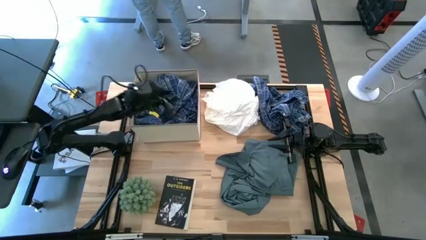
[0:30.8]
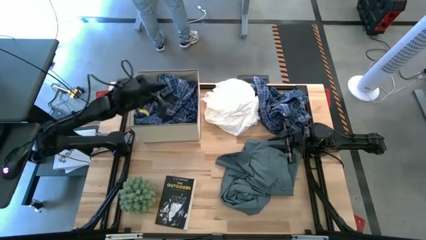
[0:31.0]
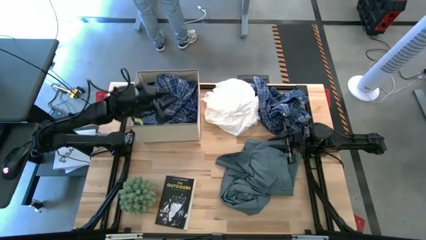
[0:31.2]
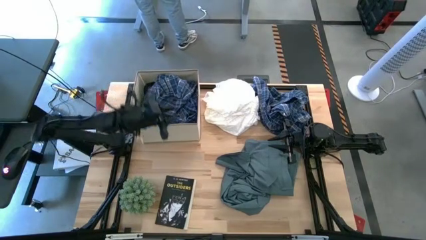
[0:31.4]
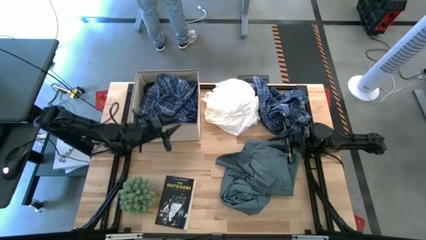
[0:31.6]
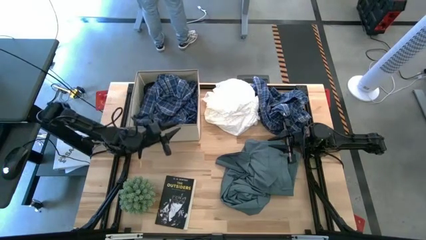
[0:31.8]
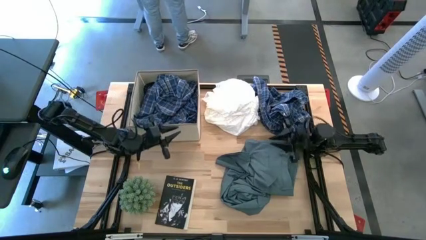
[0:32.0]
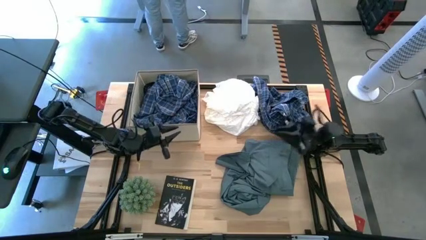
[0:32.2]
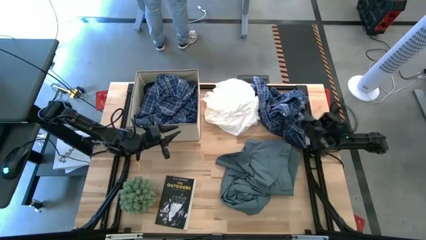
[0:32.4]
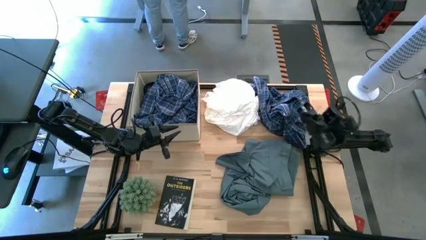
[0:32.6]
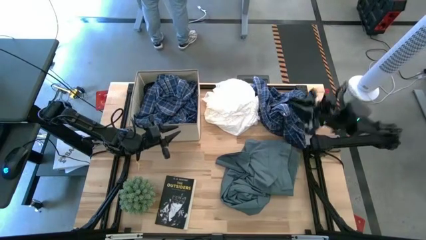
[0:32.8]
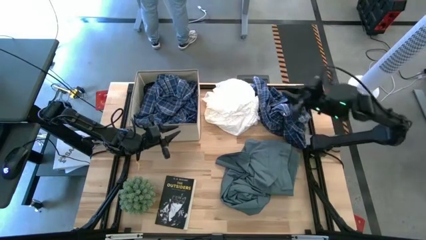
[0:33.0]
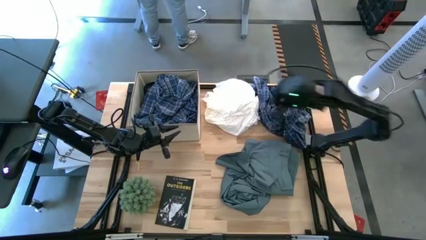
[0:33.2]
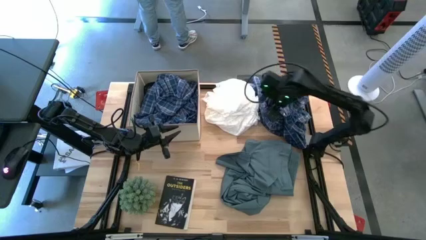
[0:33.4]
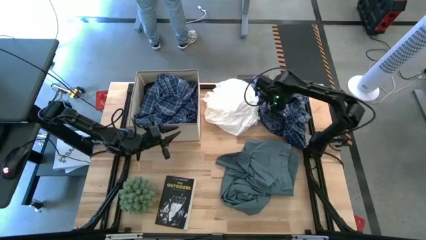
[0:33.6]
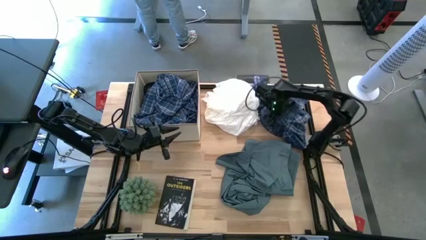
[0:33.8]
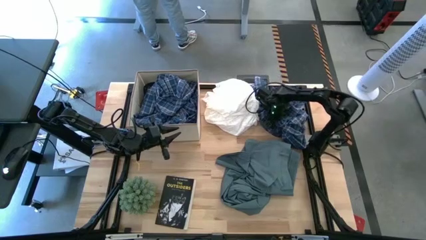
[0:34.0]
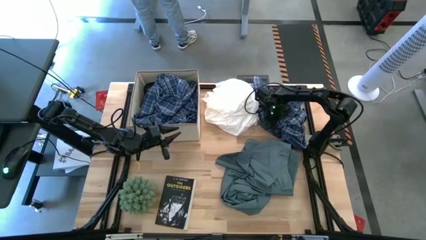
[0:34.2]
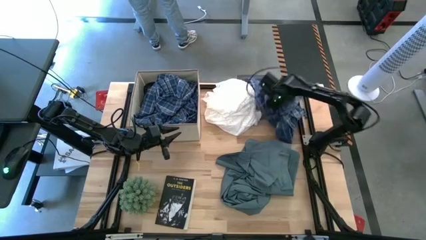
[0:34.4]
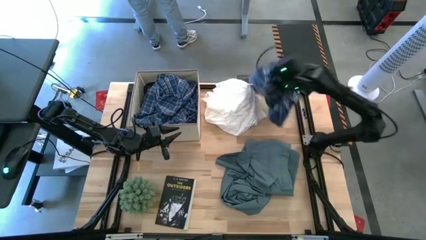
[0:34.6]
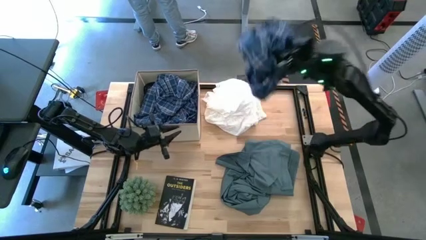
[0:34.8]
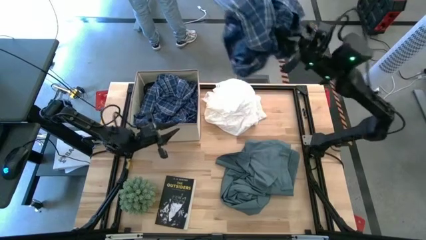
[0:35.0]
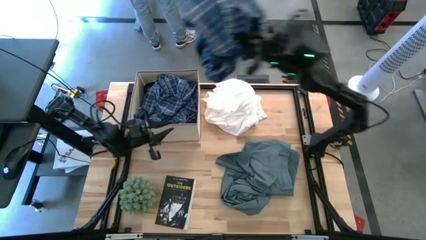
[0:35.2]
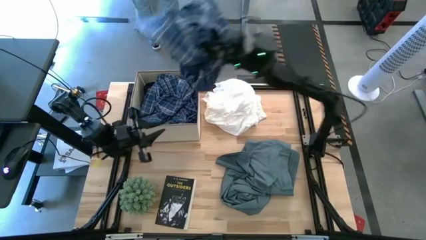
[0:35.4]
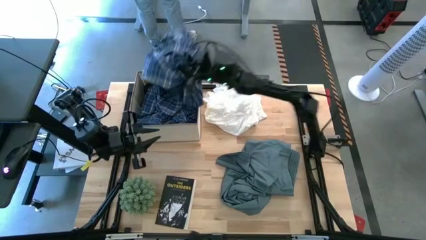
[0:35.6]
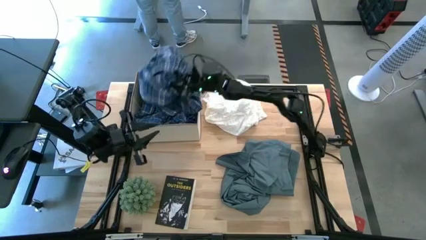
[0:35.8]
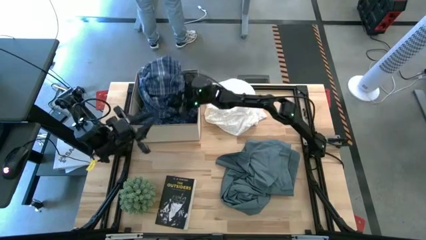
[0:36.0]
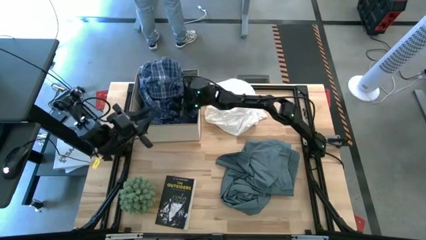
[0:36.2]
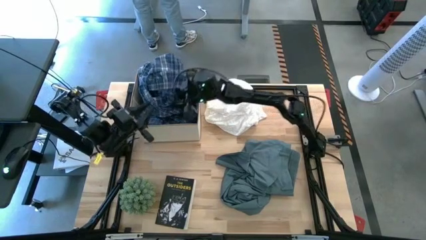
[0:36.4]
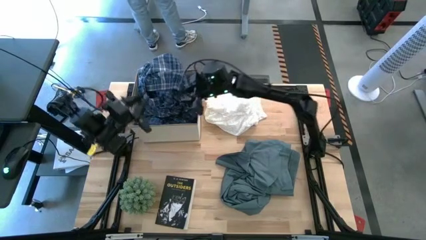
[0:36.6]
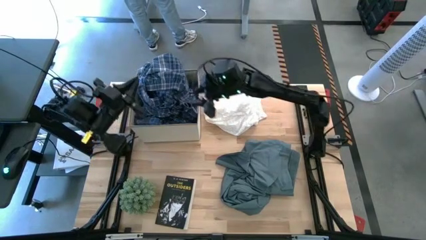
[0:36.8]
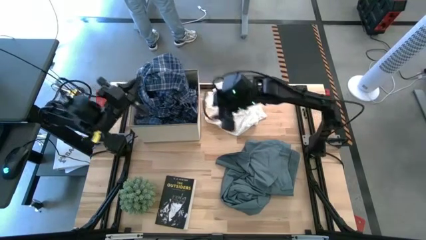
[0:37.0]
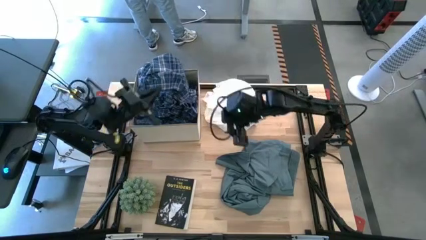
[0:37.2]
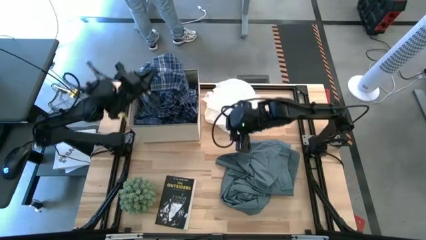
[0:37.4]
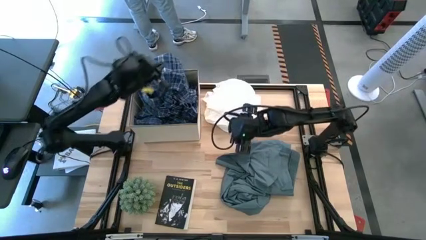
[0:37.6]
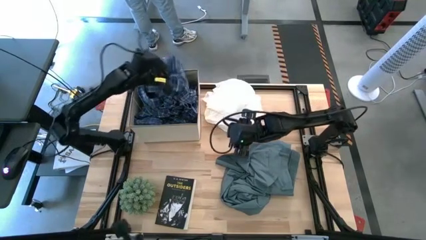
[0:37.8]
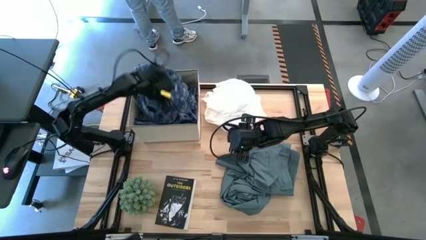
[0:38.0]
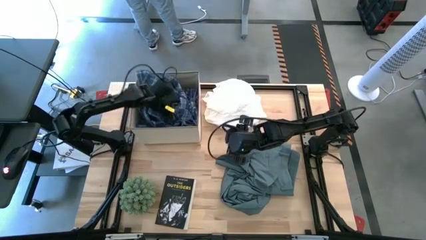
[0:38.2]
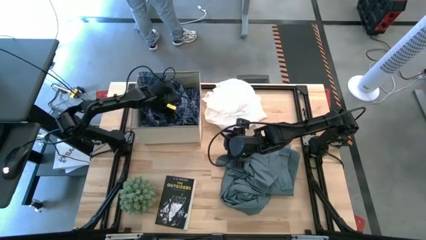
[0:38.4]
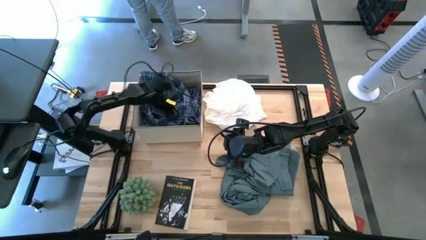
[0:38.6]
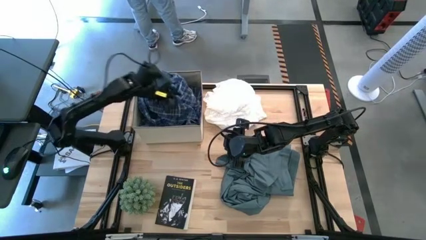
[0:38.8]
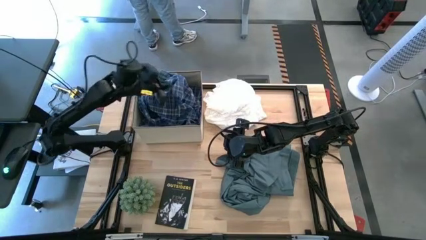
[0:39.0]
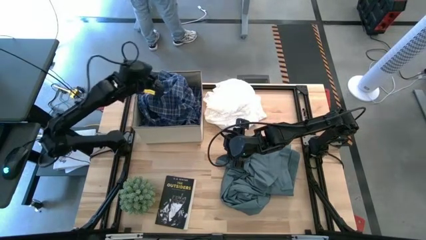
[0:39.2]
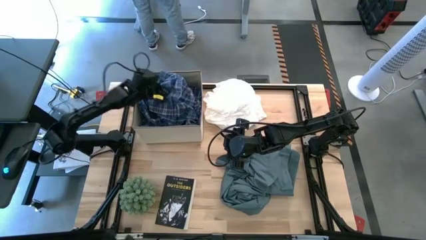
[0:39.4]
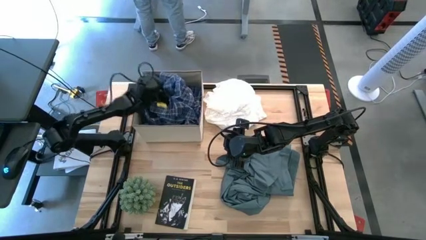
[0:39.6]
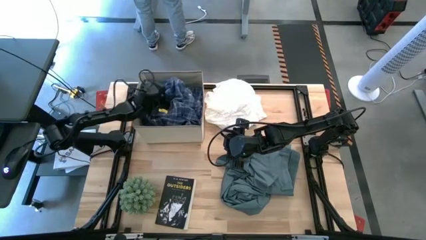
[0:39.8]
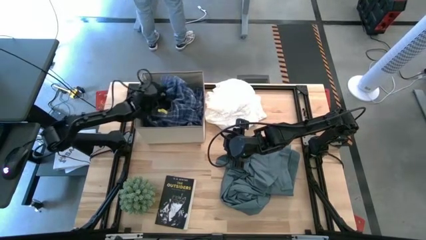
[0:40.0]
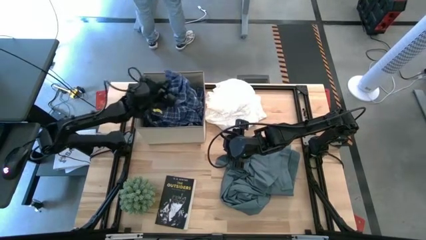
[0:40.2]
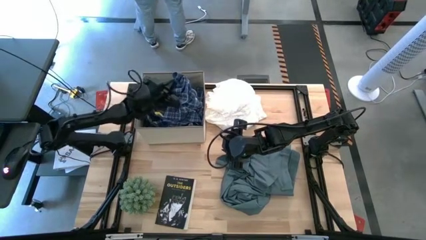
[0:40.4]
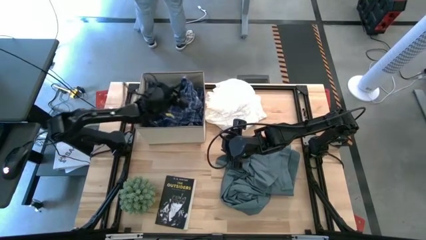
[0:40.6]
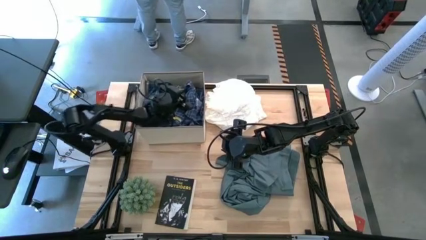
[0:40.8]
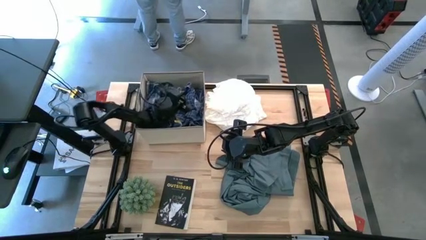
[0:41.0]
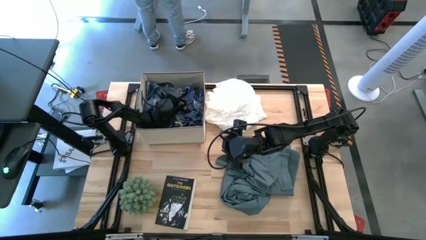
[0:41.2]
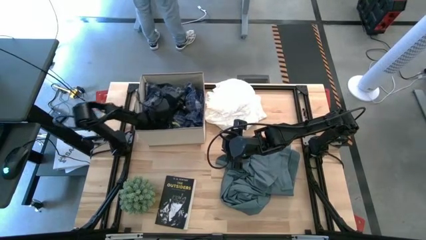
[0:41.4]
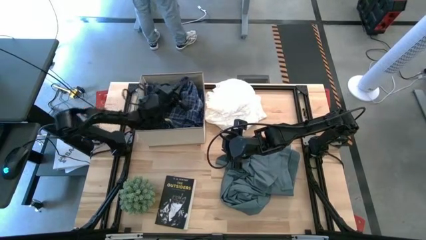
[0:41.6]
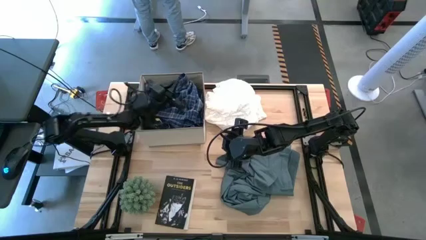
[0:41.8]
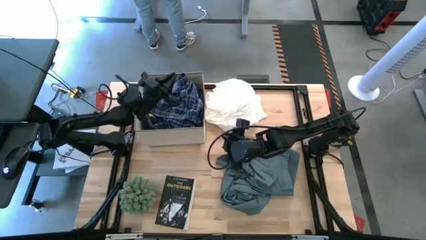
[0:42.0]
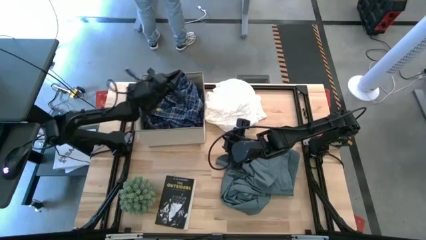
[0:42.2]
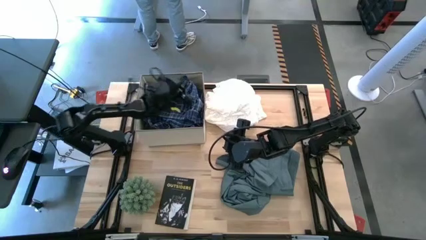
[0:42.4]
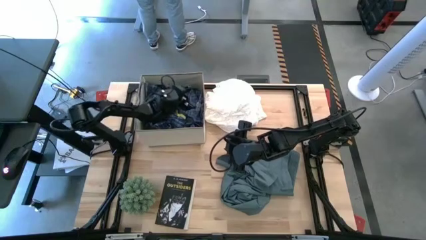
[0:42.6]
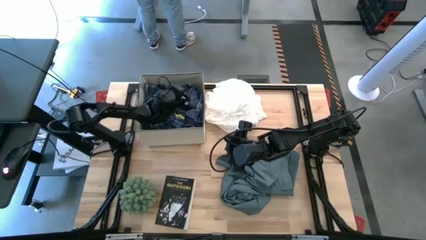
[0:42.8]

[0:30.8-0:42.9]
Task: Sort clothes
Put the blue plaid shirt into the laundry organizer
